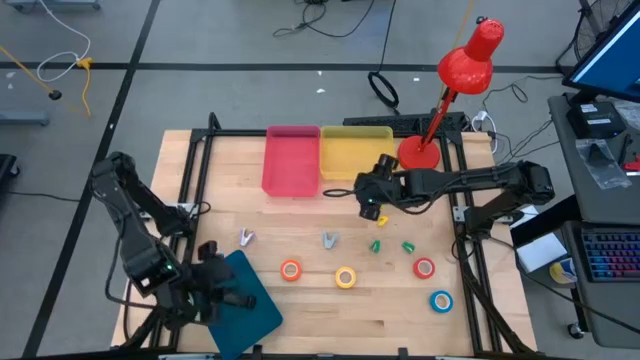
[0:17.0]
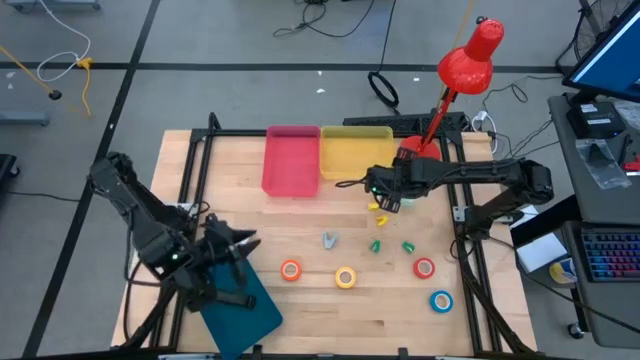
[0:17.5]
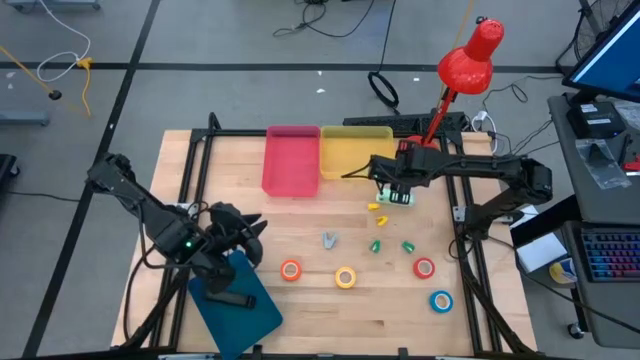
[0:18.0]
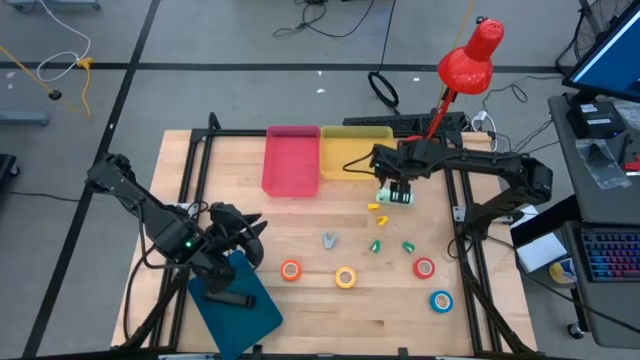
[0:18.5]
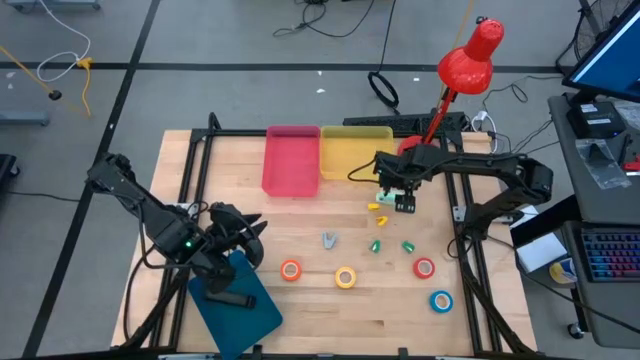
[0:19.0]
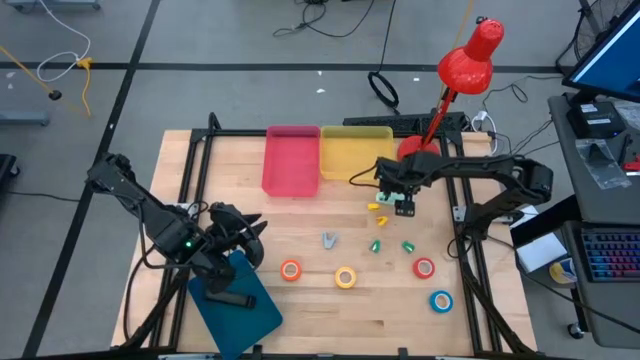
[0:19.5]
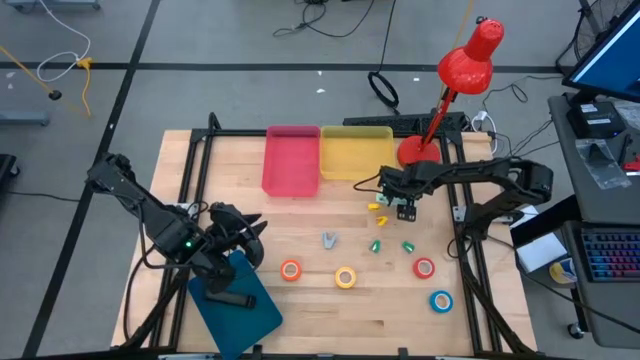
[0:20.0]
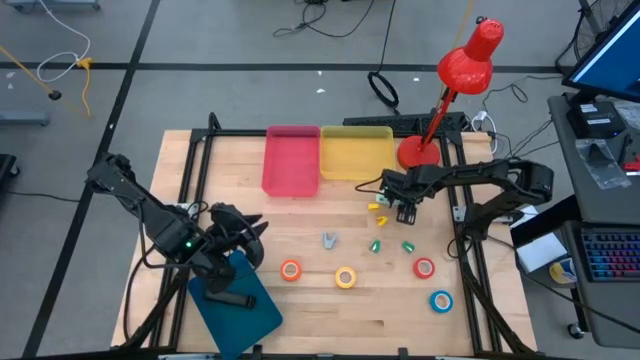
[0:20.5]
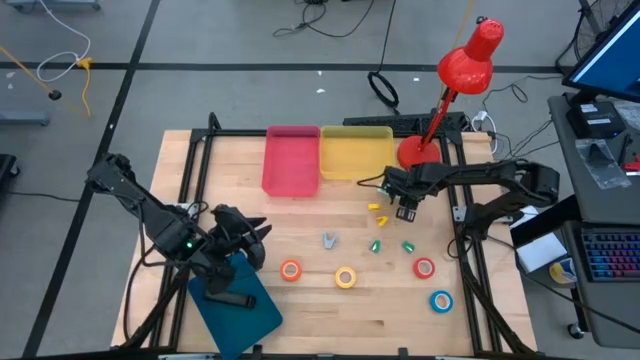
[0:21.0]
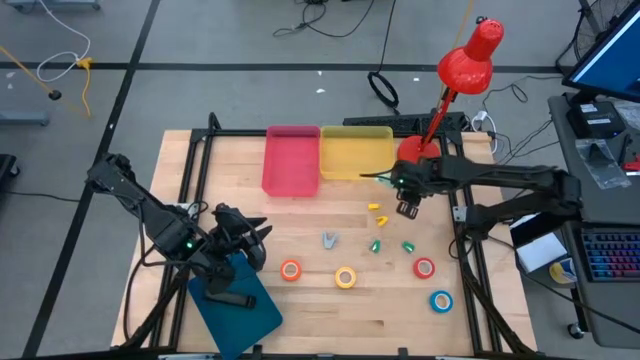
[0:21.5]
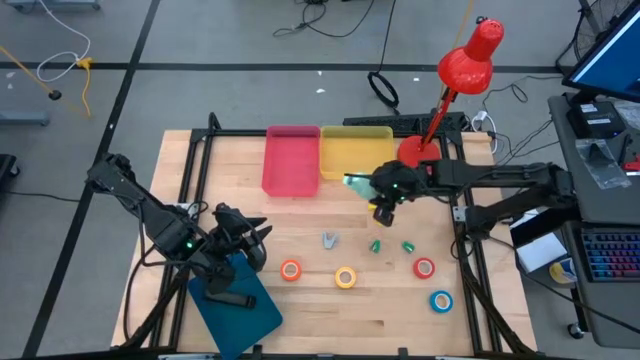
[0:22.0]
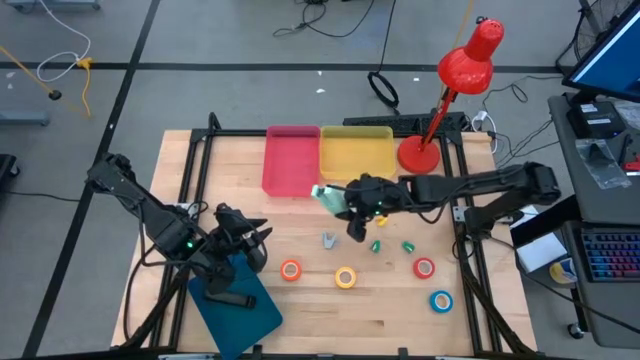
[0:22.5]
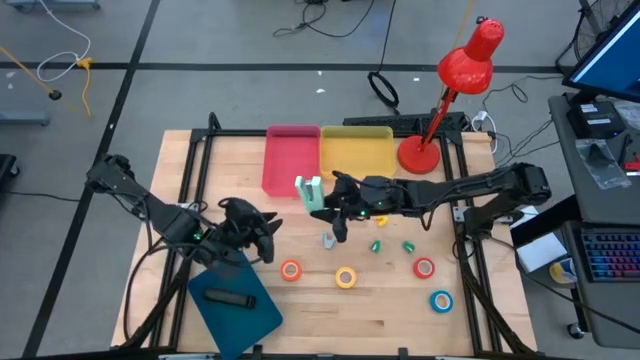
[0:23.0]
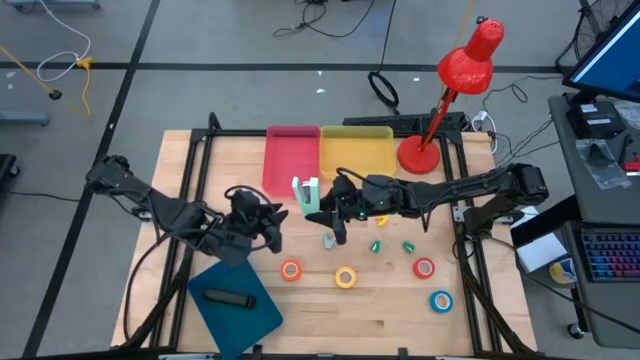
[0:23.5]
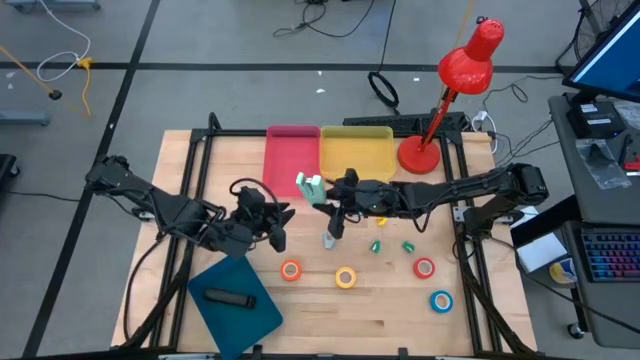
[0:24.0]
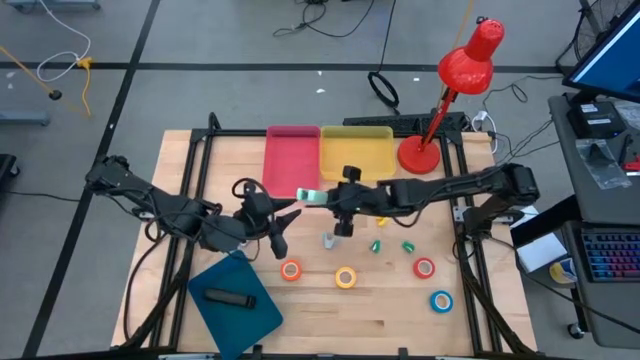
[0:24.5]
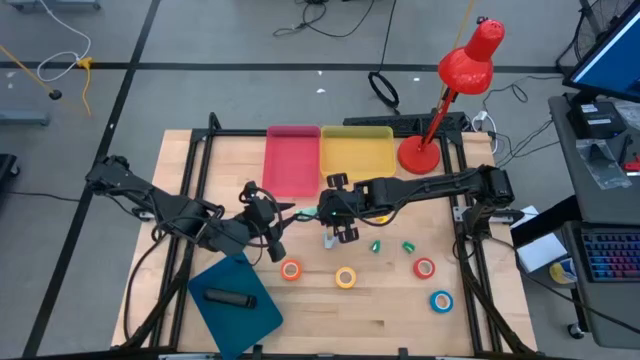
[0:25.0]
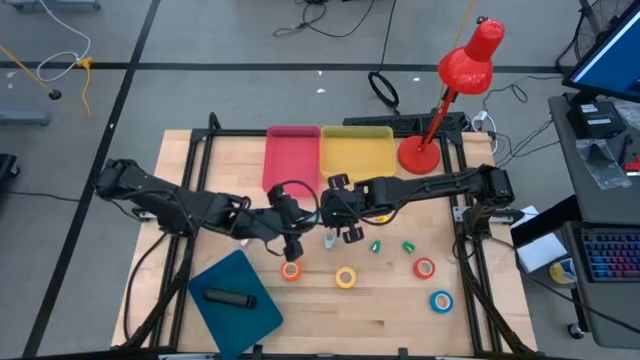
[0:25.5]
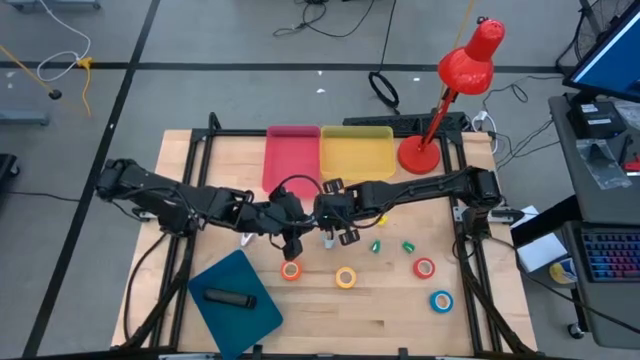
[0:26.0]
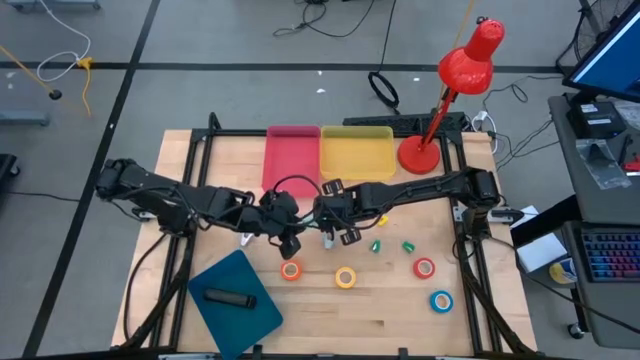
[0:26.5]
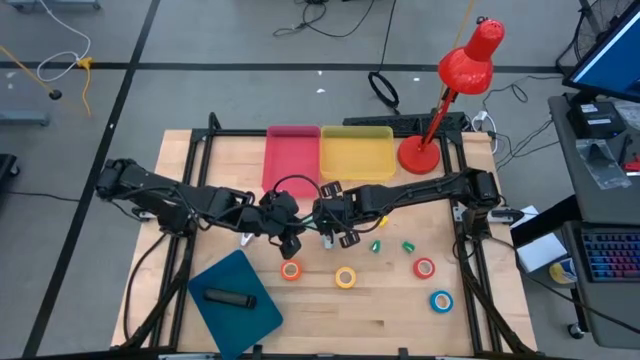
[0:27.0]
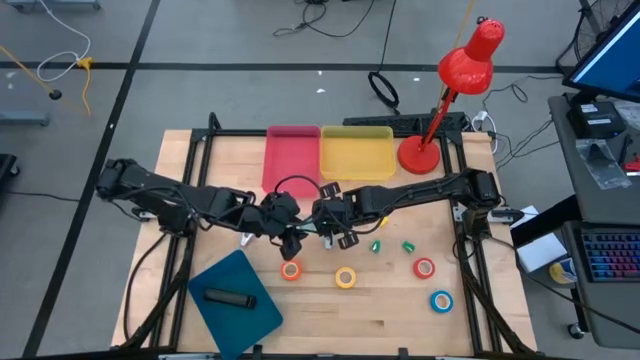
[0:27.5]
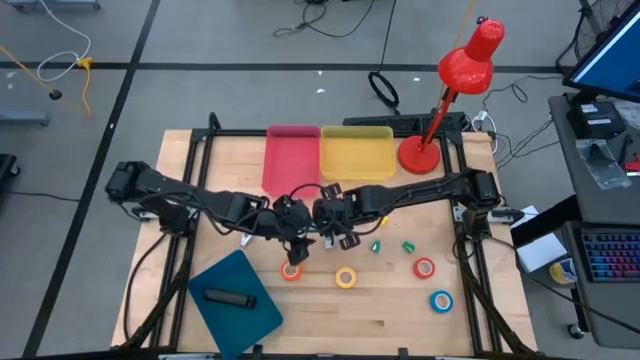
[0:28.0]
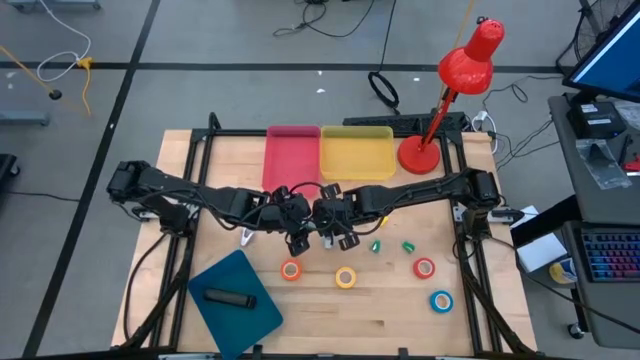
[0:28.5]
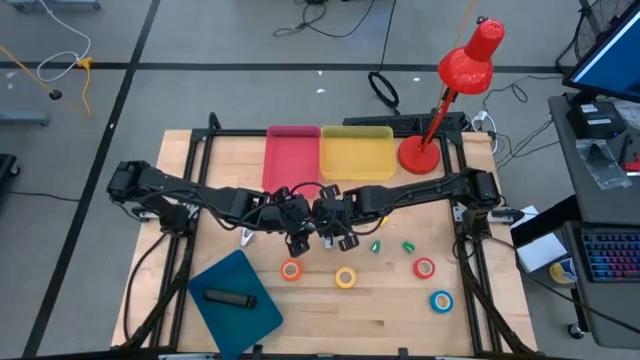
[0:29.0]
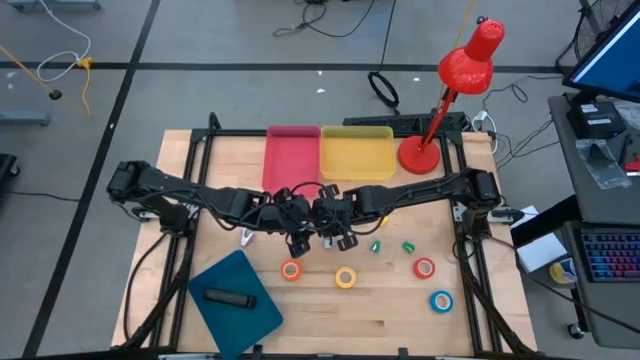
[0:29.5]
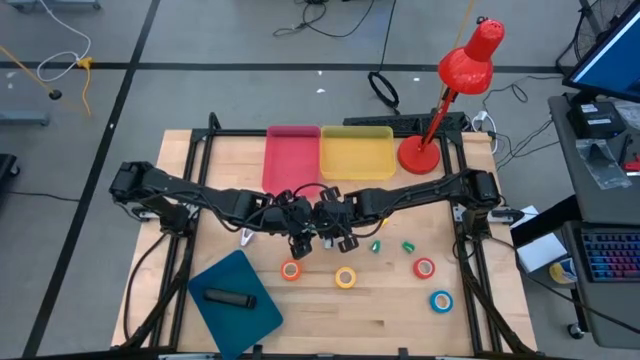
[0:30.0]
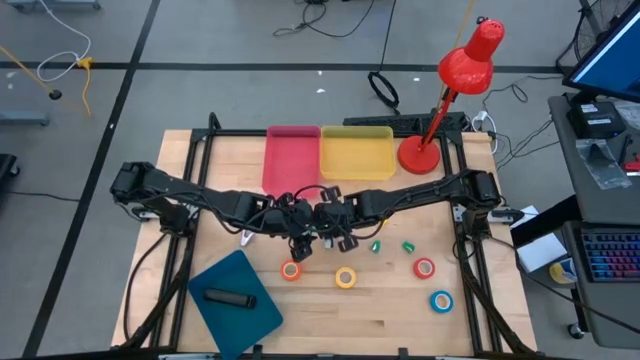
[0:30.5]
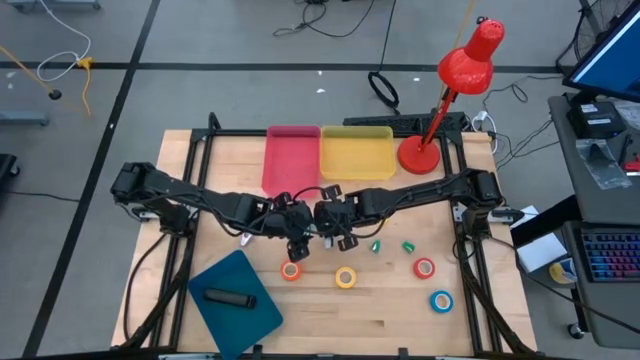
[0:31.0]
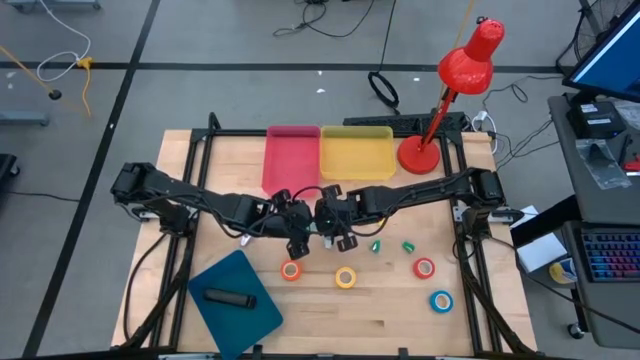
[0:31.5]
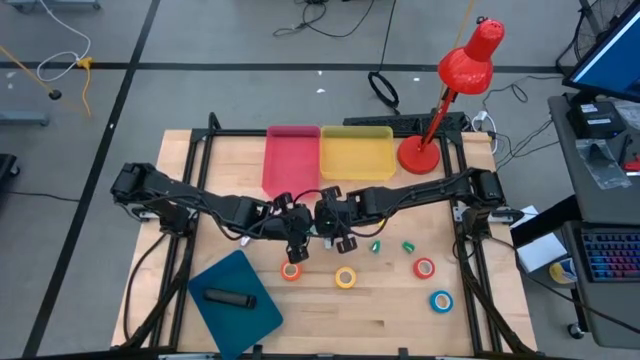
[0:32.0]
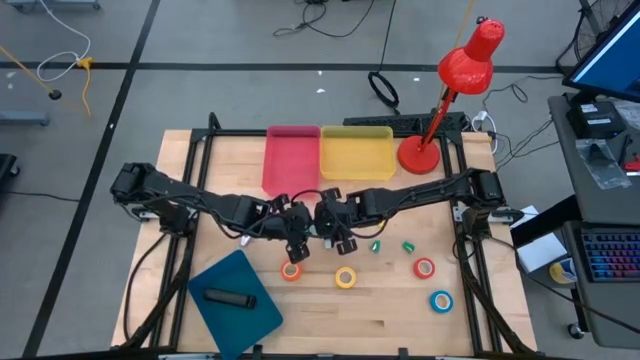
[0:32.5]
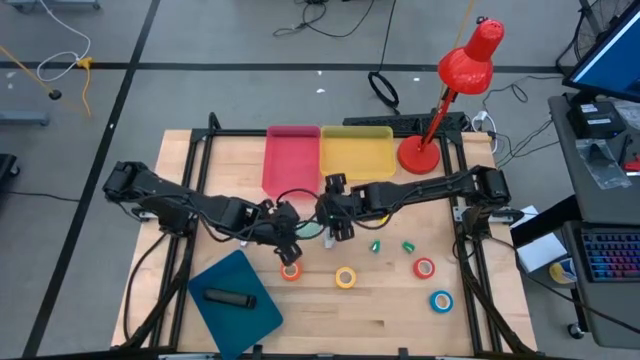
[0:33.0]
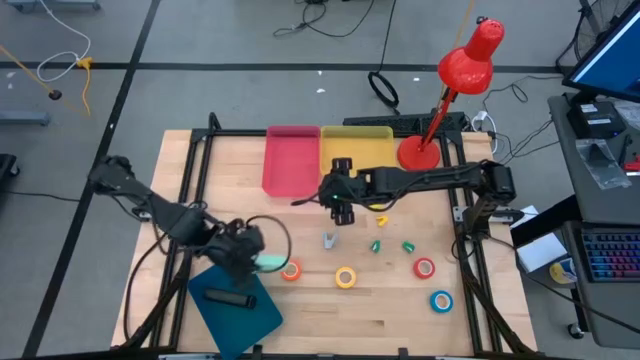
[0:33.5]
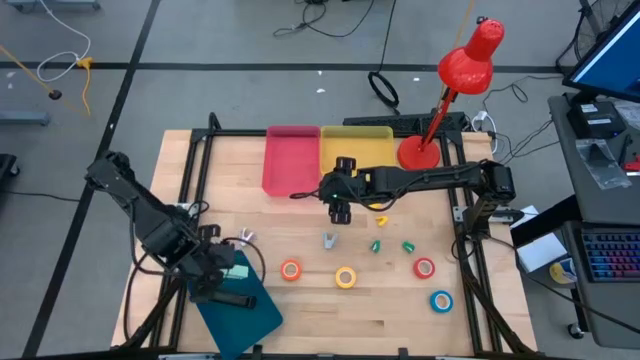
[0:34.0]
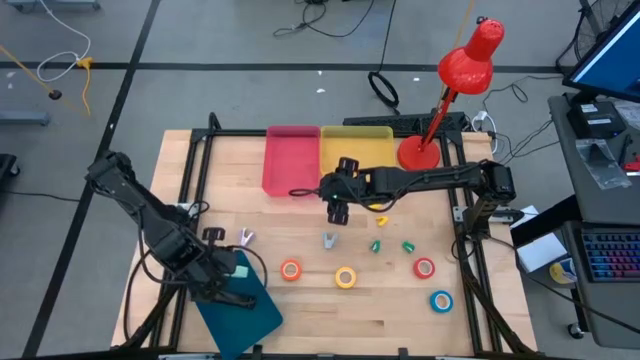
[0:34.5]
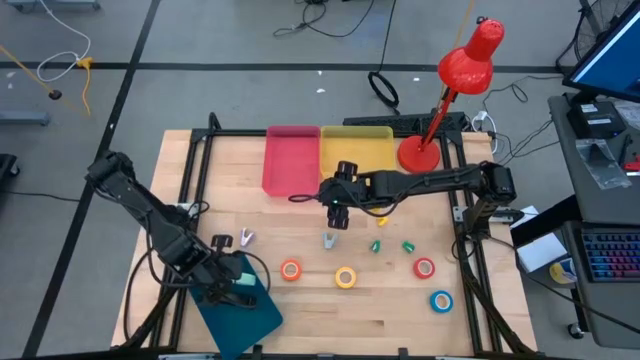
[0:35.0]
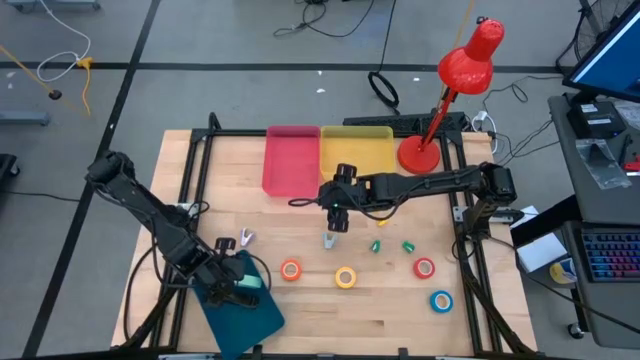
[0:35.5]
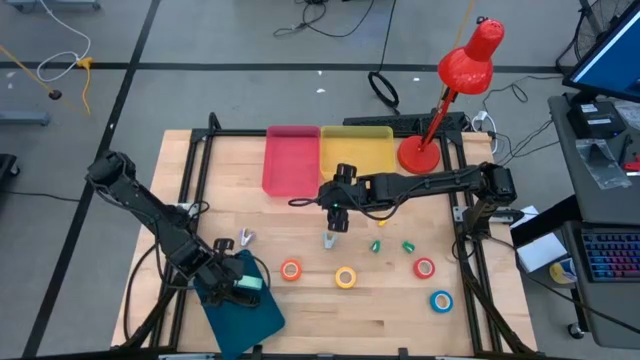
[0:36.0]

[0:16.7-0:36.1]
Task: Pick and place Stapler, Stapler remover, tape
Put the large light green stapler into the blue bin
